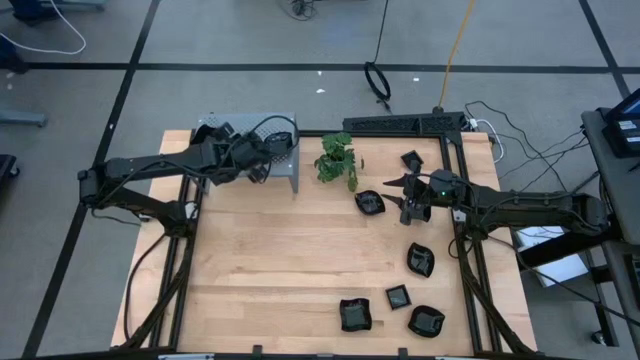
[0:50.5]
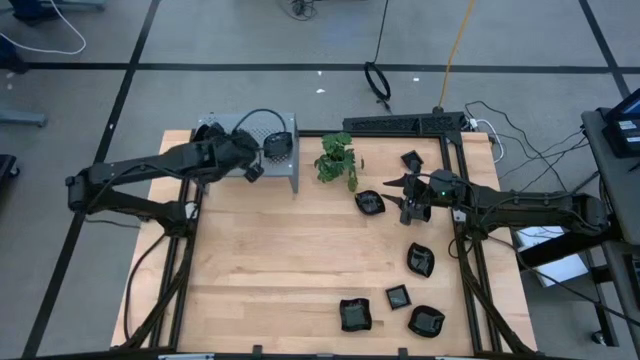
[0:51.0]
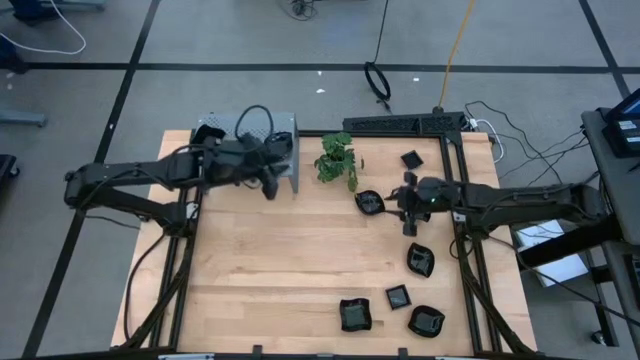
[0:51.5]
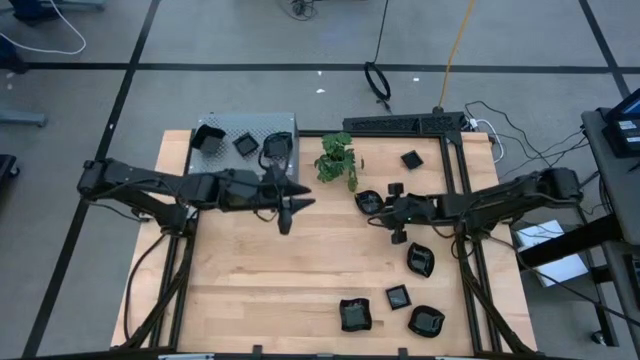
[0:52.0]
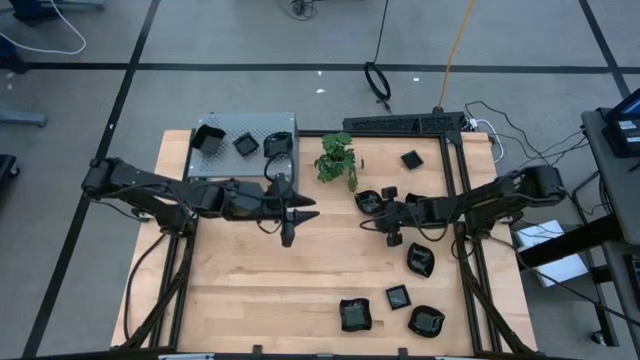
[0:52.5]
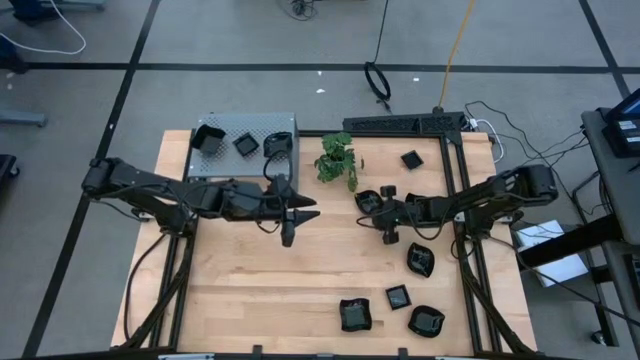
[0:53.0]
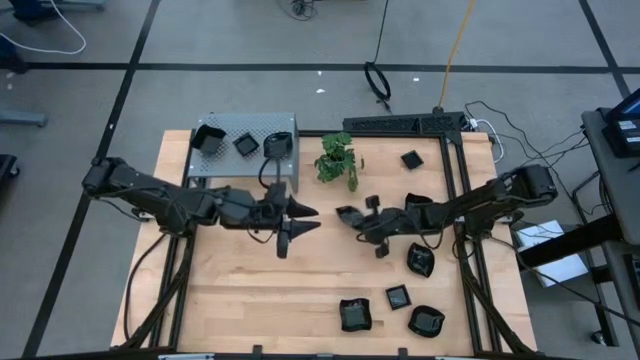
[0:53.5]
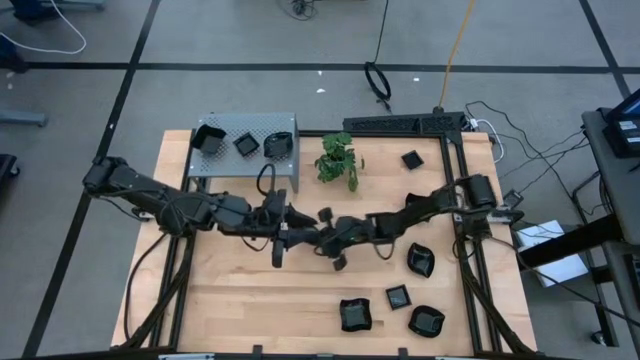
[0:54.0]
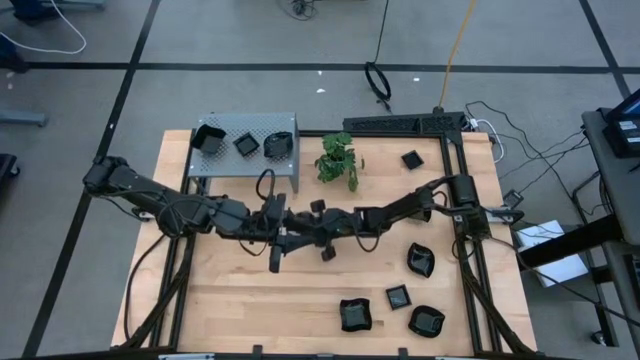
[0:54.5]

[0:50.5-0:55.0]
Task: Pick & Place Mini shaped plates
Move the leaf-shaped plate to the center of the table

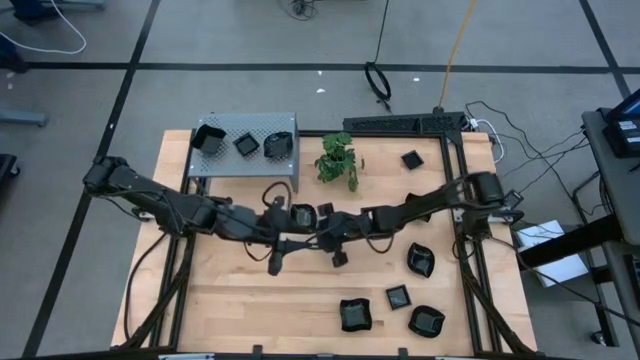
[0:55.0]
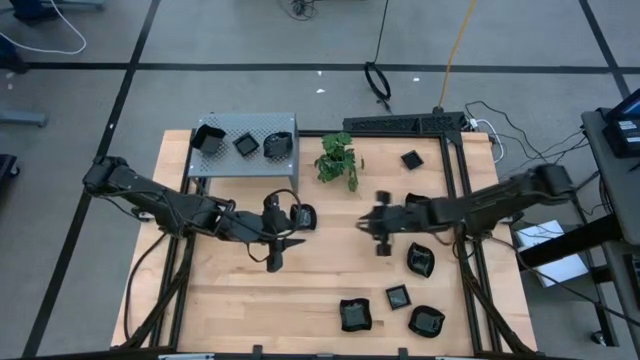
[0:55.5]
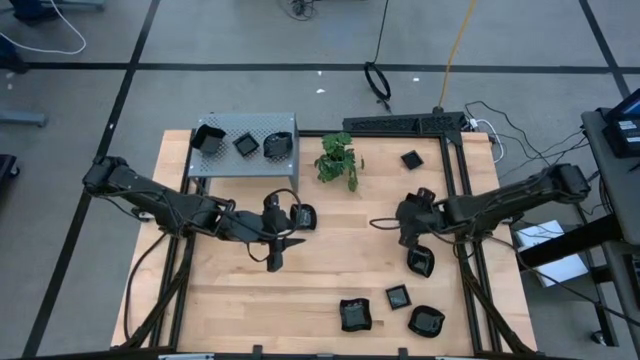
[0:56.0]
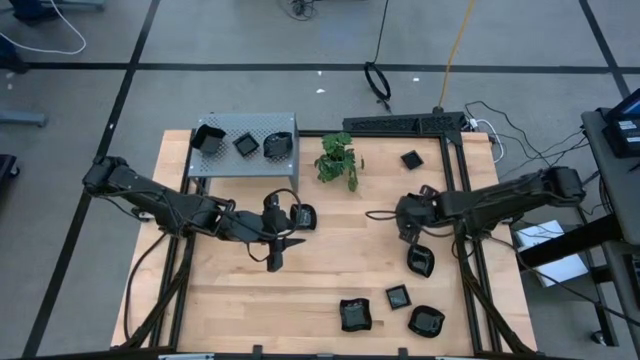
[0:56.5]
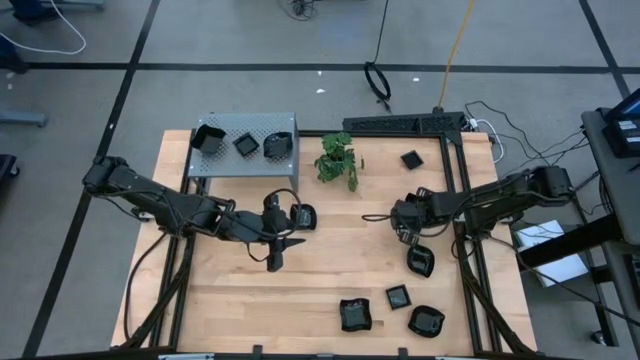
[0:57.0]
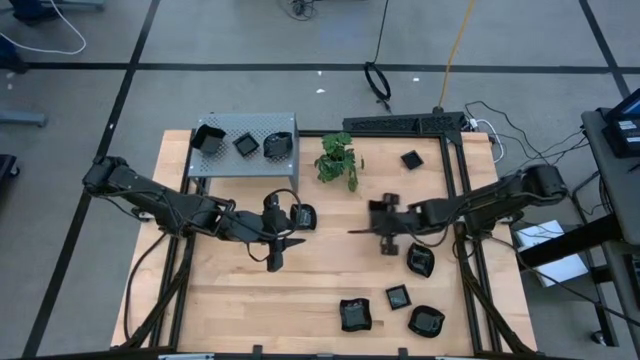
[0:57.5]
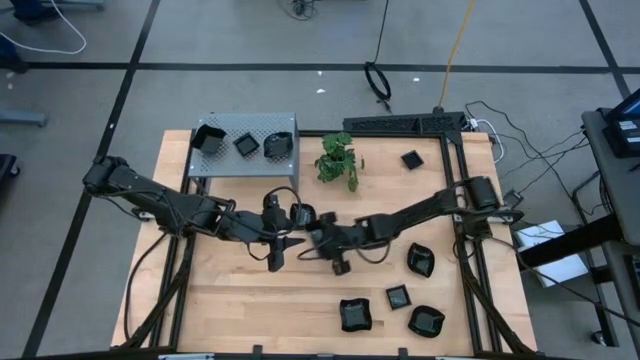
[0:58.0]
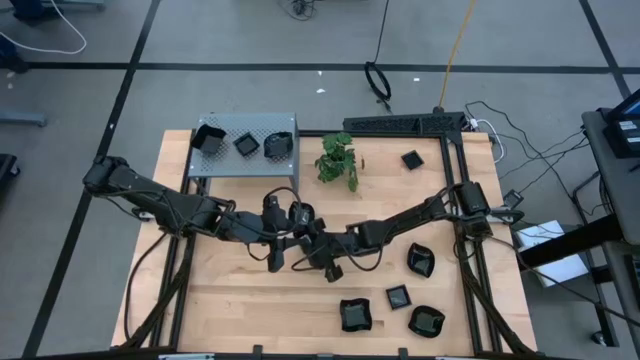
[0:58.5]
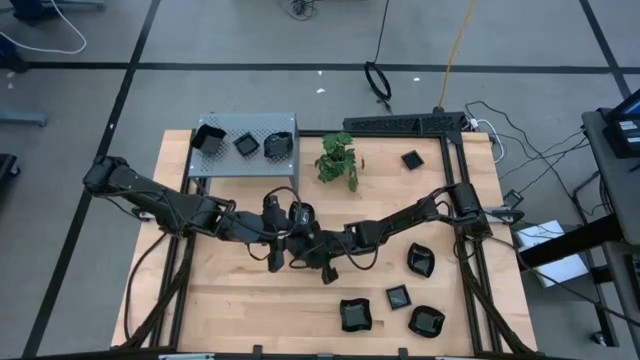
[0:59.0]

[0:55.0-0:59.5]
Move the distorted square plate to the center of the table

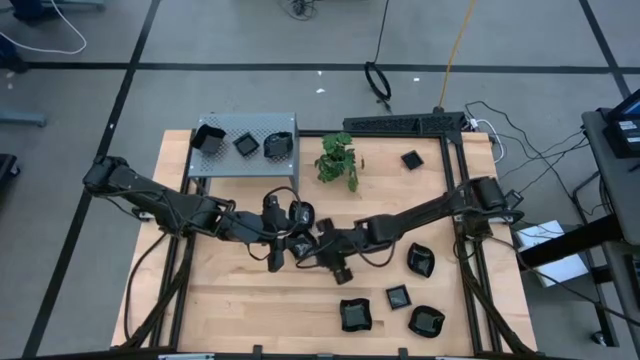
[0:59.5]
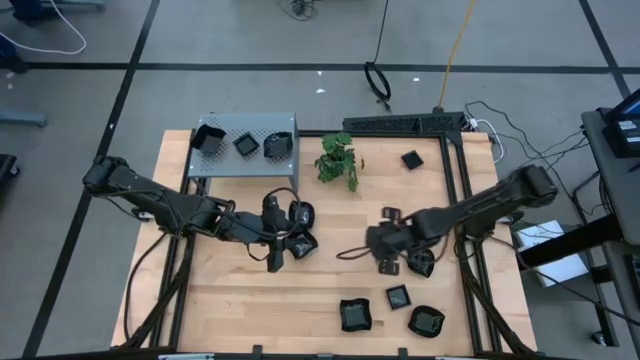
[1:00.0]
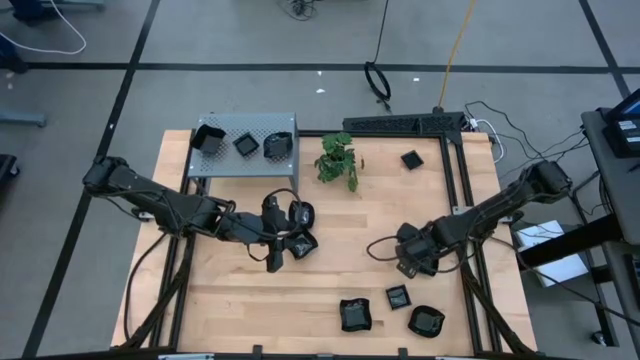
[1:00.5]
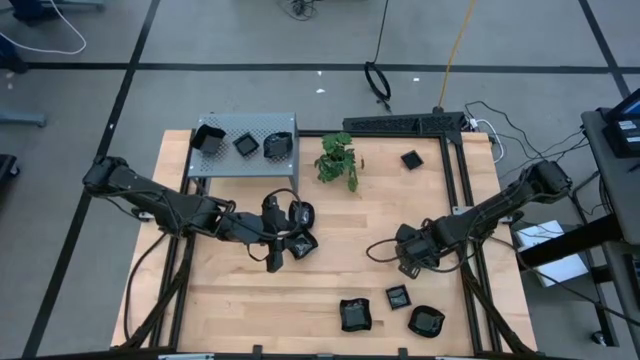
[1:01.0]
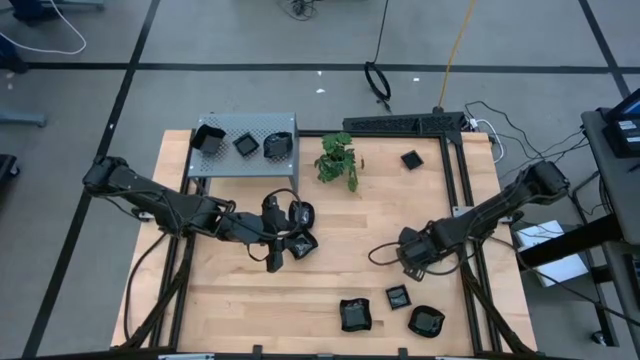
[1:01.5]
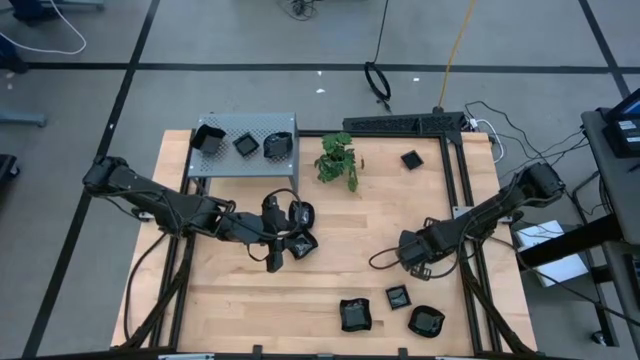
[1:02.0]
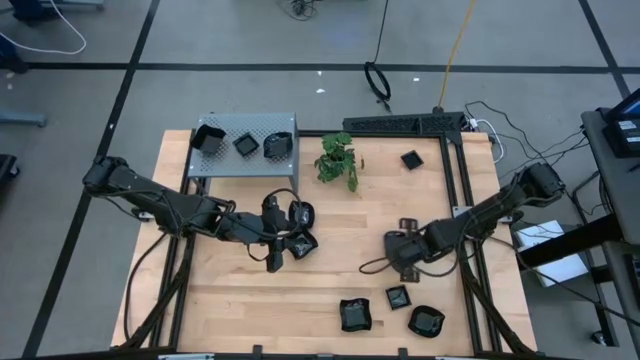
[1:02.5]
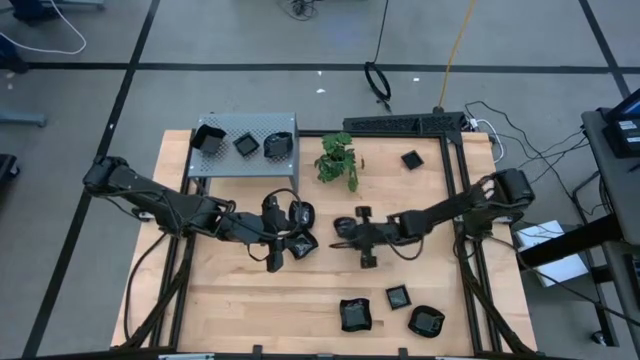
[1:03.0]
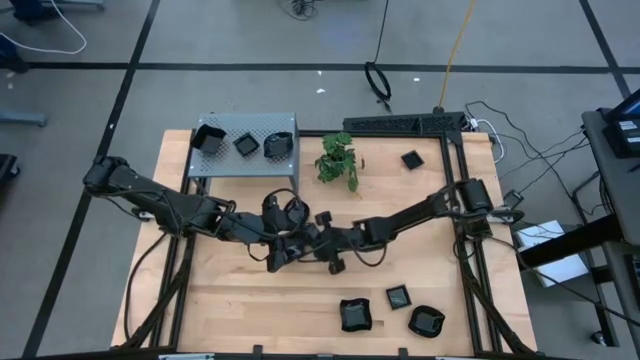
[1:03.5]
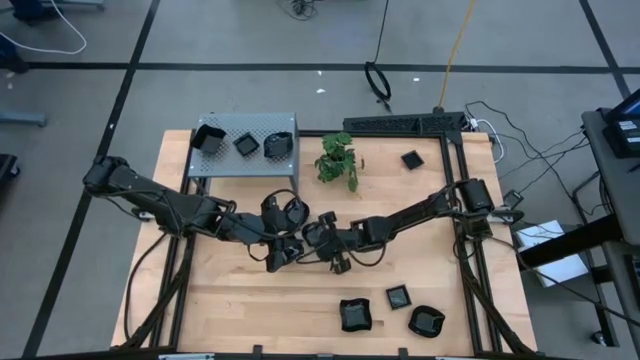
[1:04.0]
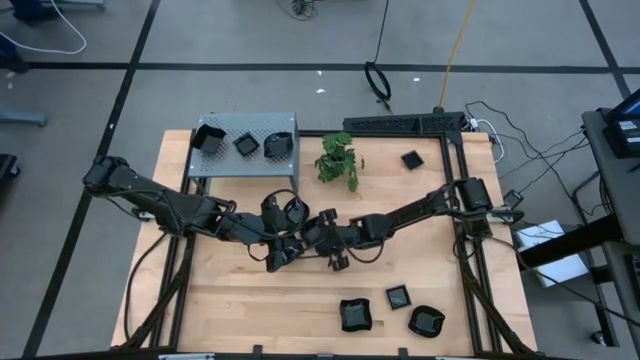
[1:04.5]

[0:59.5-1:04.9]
Move the leaf-shaped plate to the center of the table

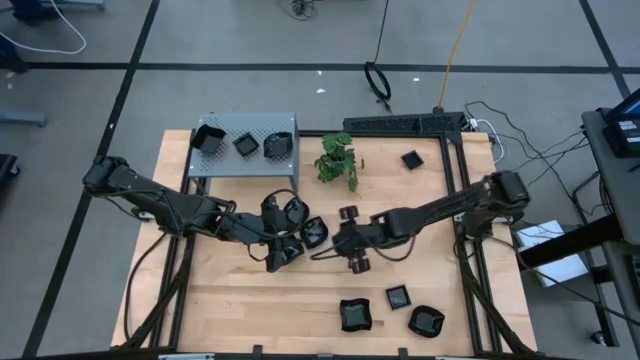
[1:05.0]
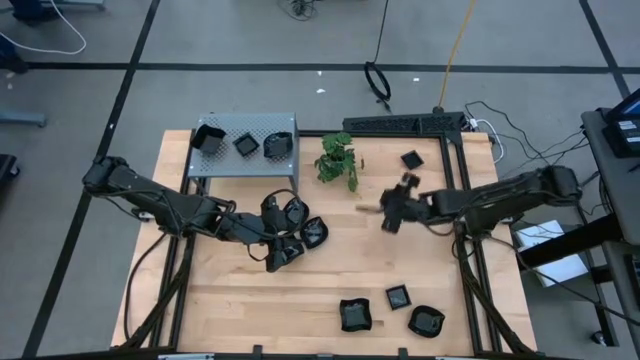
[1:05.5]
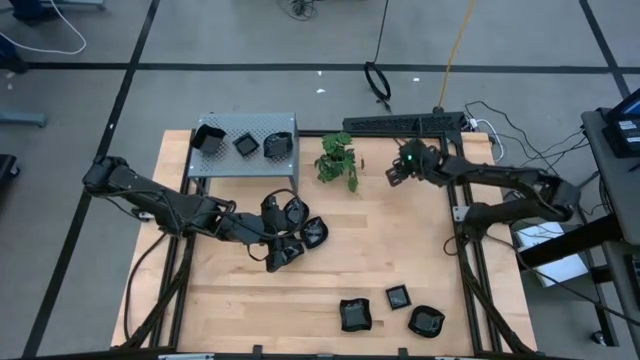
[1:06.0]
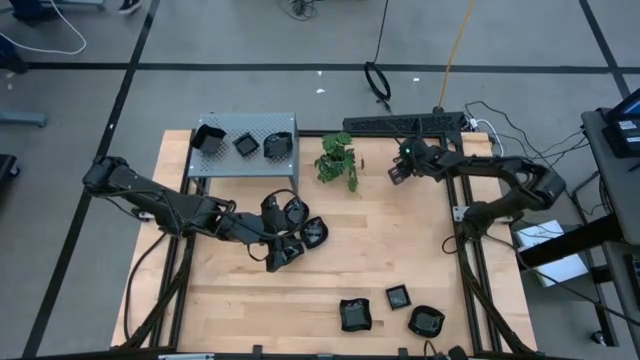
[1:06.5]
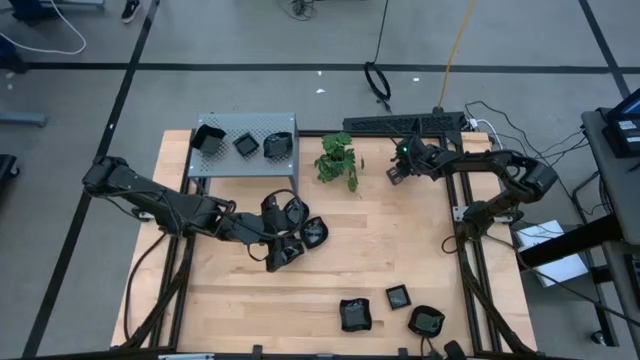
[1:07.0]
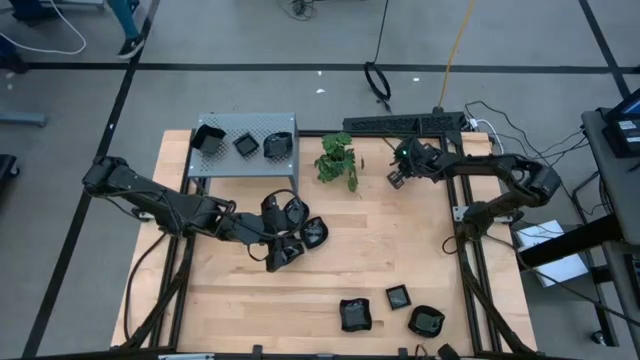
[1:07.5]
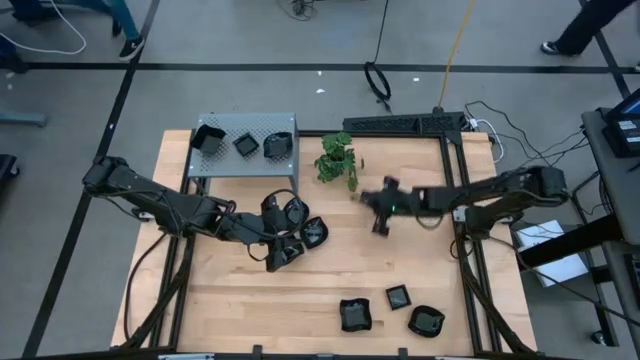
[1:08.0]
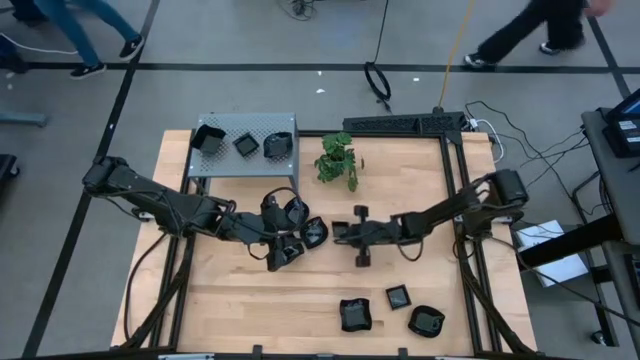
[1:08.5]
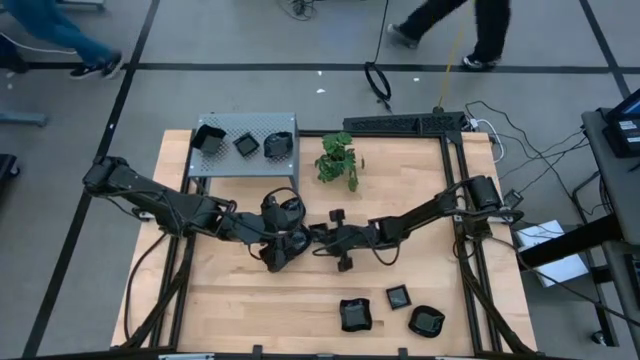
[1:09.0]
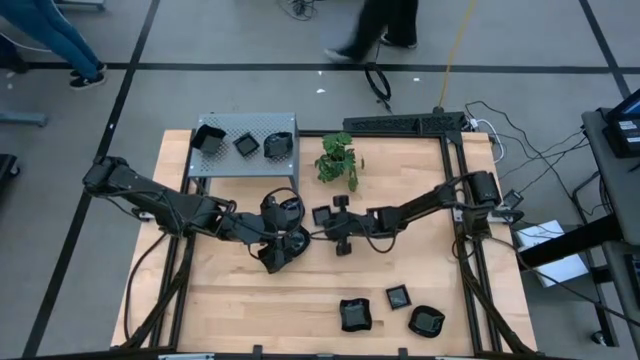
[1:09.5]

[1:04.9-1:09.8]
Move the square plate to the center of the table

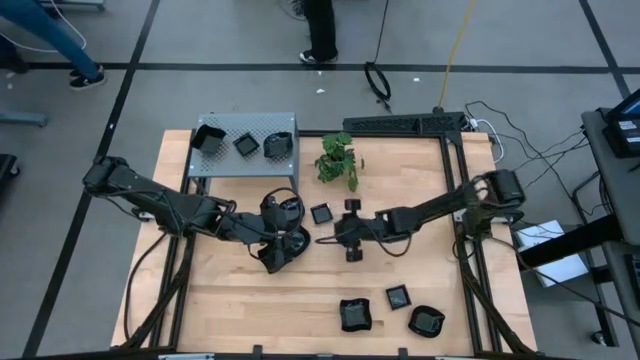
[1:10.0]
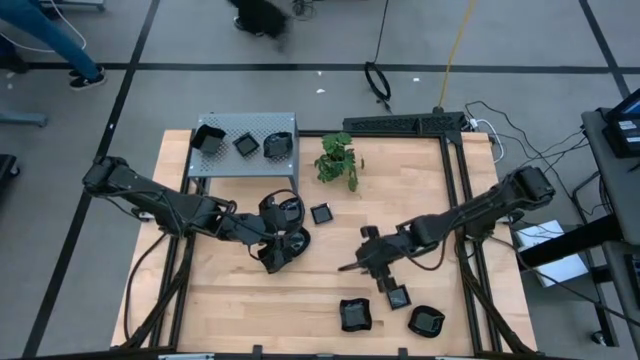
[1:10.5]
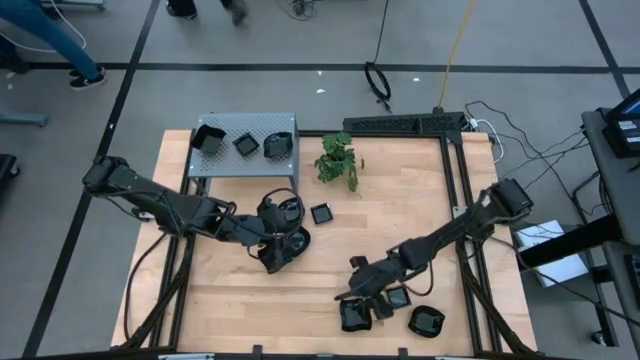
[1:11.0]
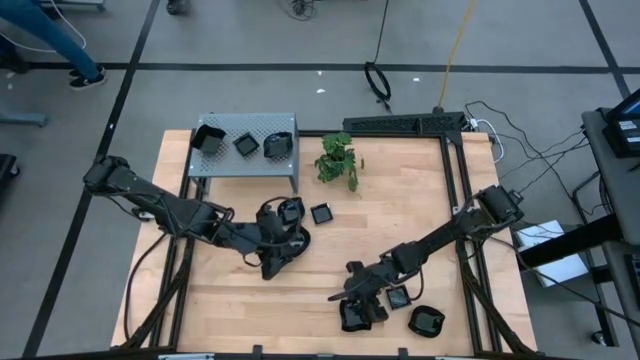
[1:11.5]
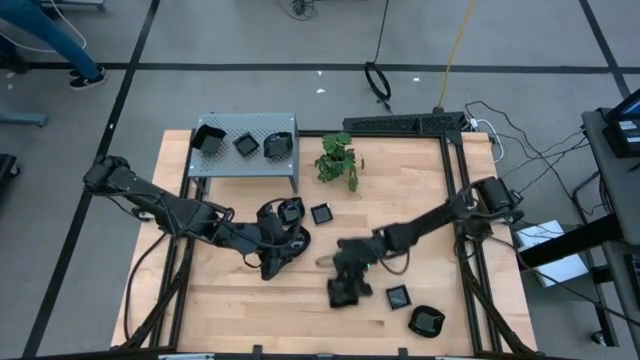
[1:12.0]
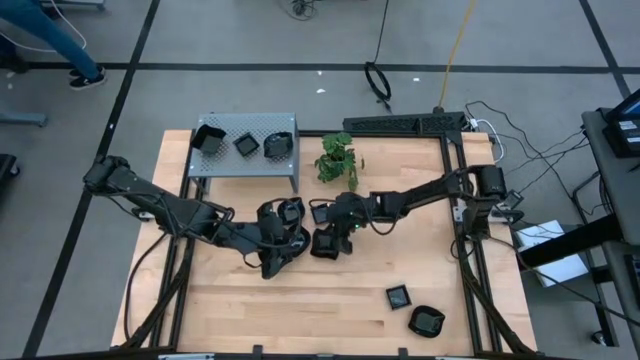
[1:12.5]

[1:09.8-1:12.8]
Move the distorted square plate to the center of the table
